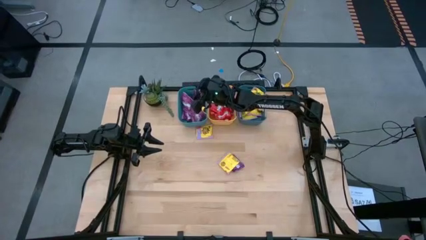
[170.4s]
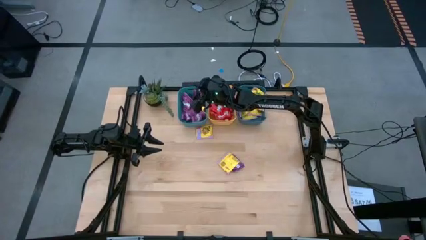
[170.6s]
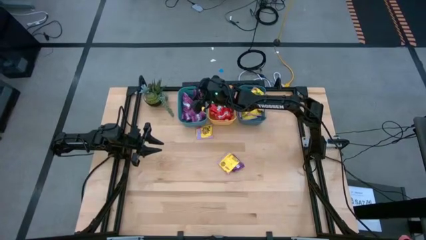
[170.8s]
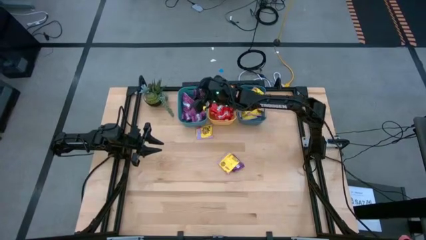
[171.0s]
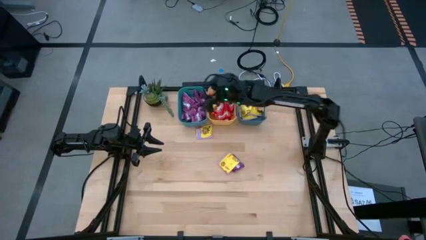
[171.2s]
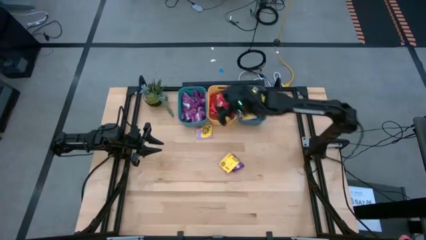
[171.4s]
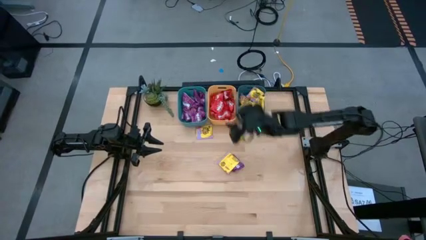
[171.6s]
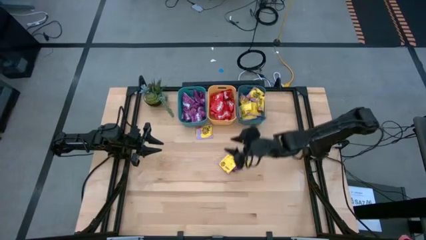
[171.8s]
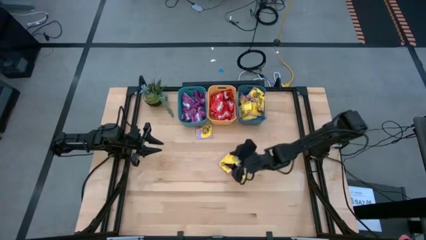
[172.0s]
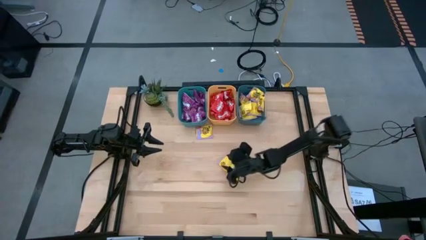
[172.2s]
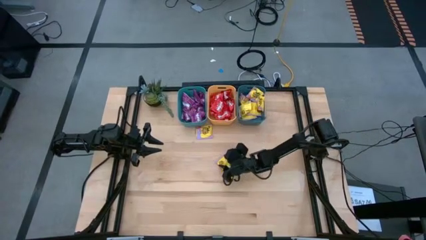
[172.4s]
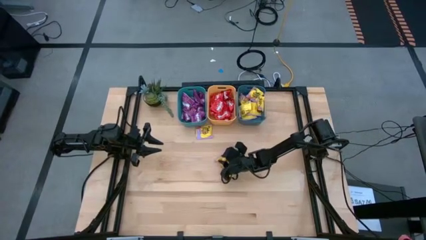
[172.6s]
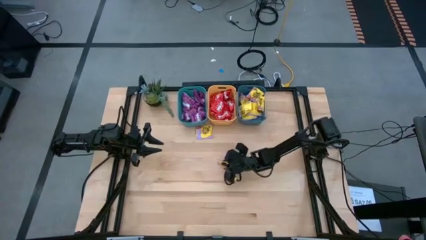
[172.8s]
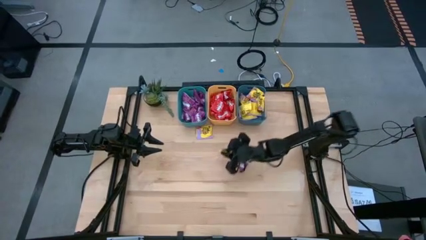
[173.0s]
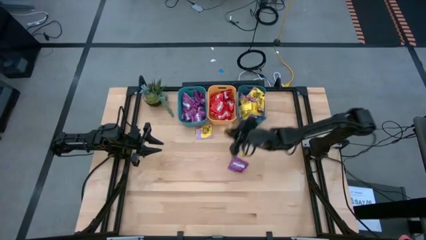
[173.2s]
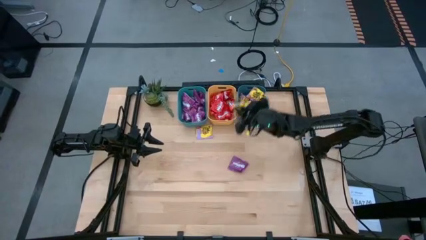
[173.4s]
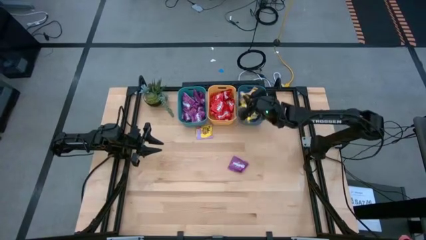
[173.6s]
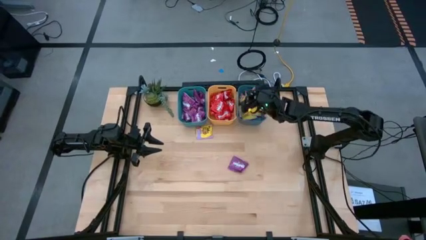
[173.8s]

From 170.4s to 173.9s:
Task: Sort candy
Put the yellow candy into the dark blue bin

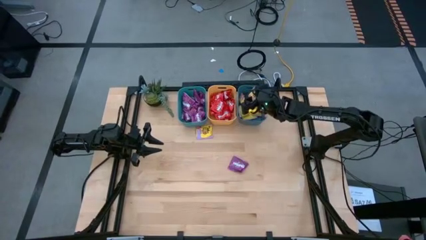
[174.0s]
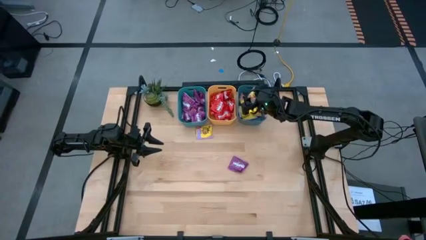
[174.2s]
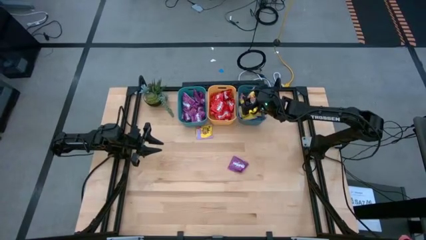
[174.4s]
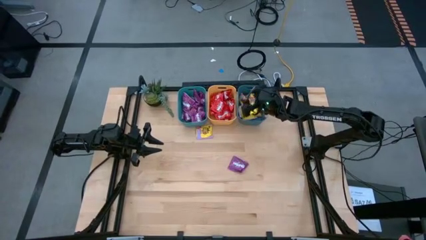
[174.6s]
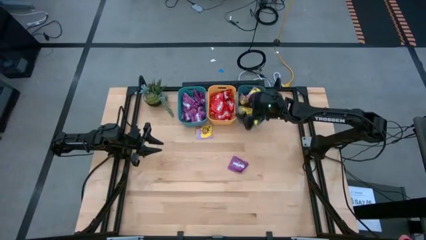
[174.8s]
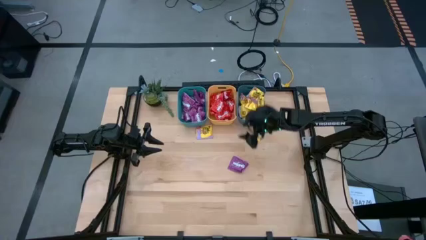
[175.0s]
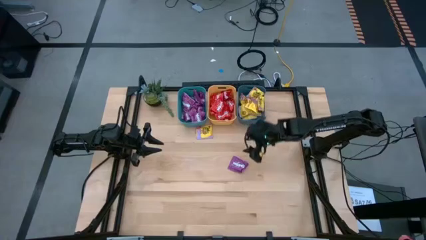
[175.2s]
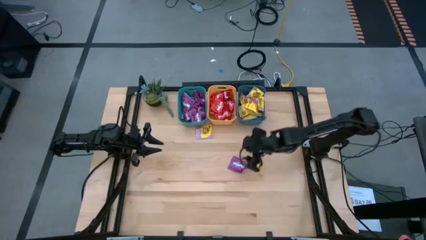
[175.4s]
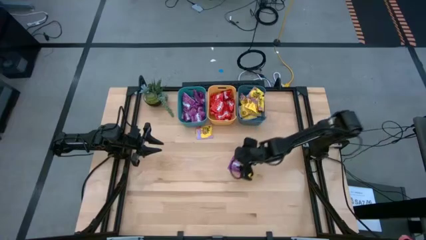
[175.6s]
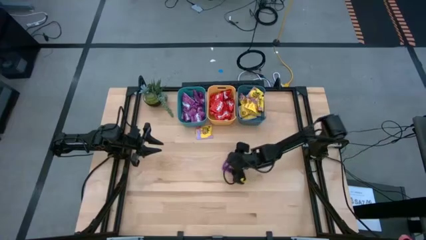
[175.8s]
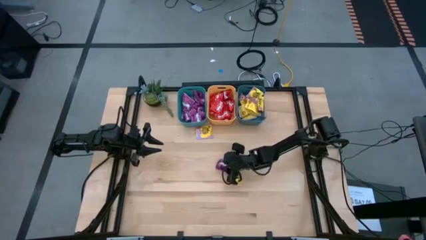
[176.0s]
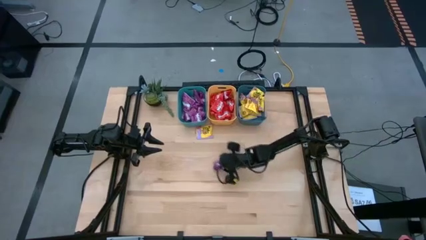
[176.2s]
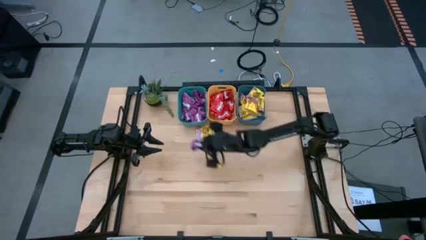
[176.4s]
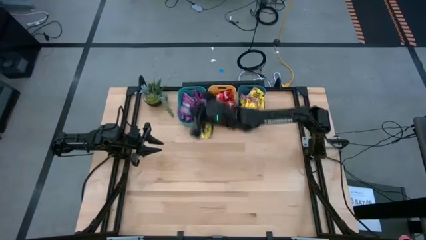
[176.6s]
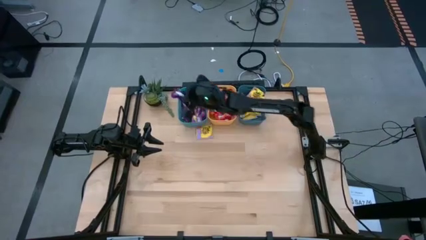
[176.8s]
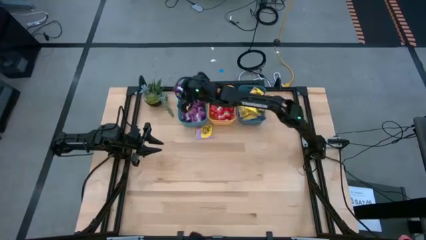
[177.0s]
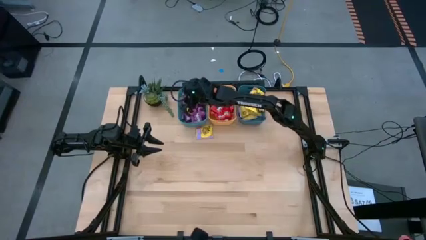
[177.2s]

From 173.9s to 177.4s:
Put the violet candy into the blue bin

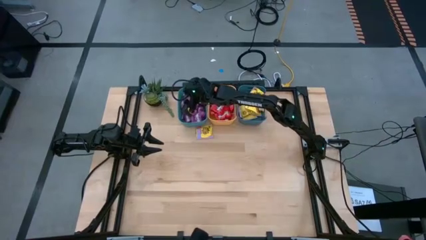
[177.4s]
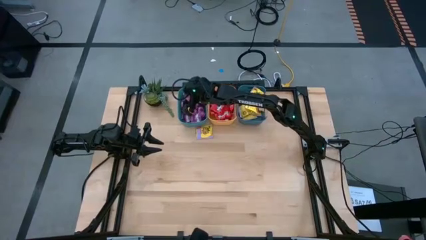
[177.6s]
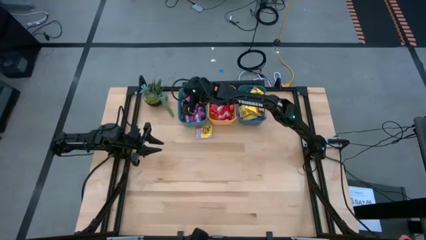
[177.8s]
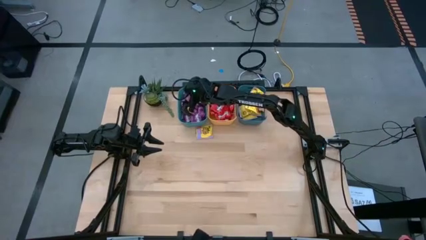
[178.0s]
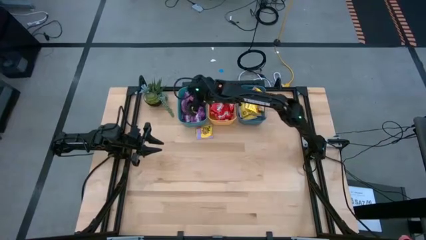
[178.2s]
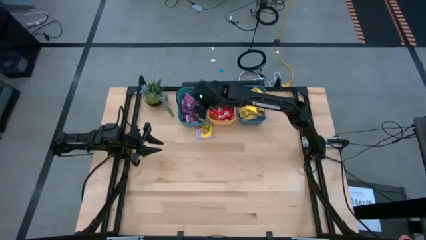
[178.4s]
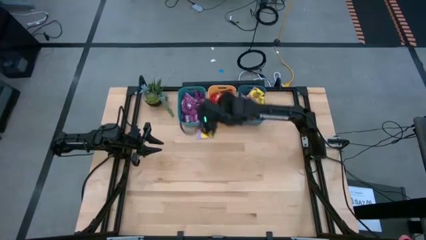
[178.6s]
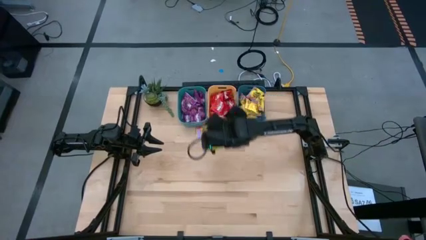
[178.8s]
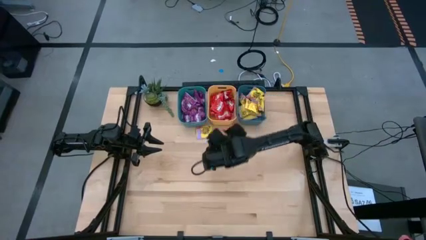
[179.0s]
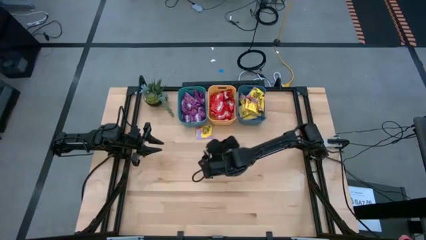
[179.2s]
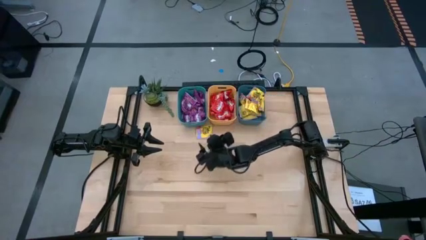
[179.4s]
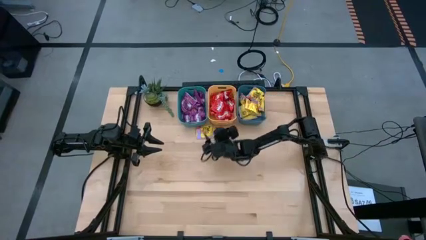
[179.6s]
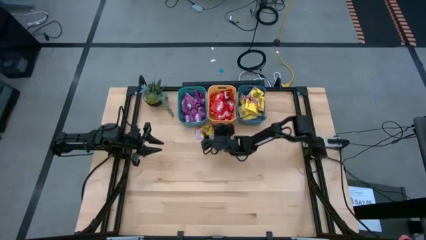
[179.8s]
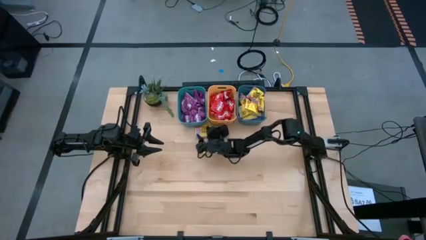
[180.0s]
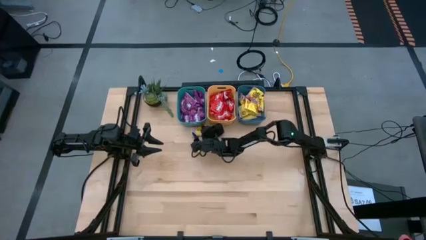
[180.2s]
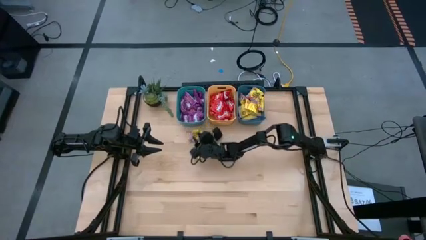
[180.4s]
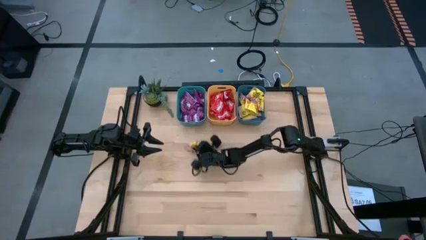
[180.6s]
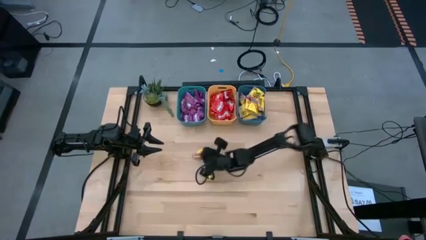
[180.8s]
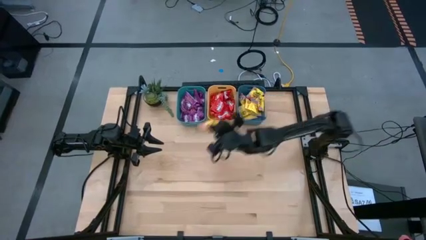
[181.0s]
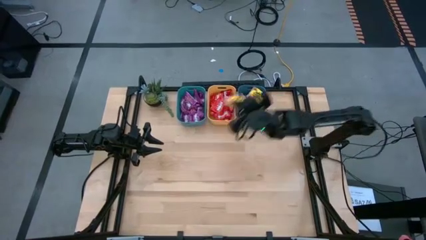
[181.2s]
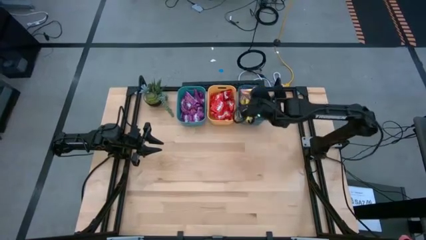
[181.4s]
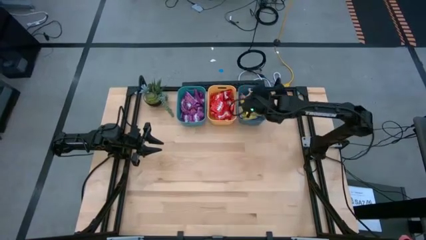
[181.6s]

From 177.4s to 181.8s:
Put the yellow candy into the dark blue bin
